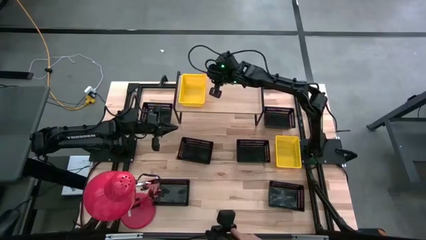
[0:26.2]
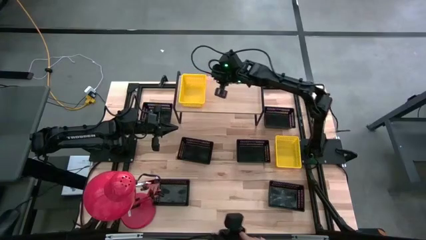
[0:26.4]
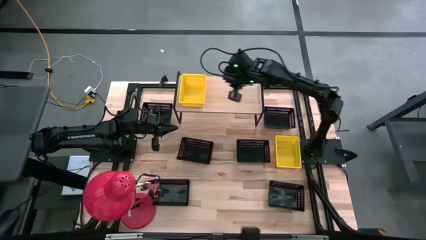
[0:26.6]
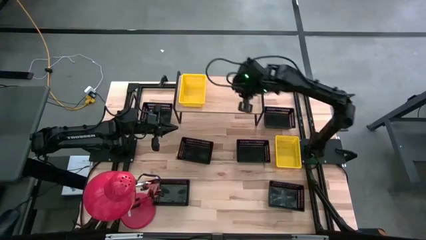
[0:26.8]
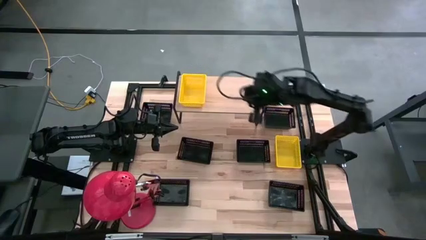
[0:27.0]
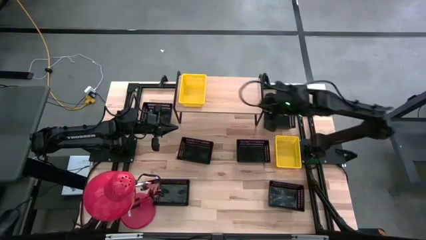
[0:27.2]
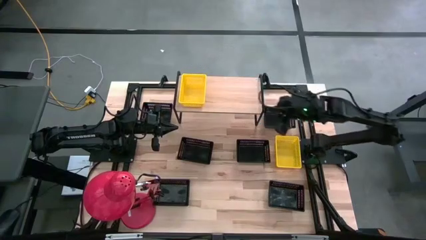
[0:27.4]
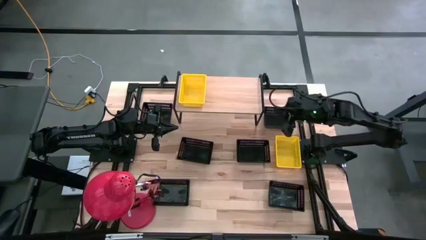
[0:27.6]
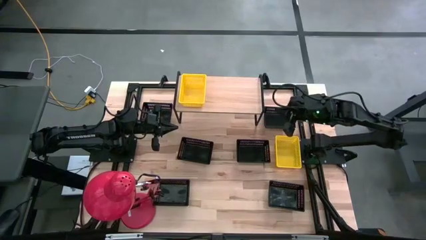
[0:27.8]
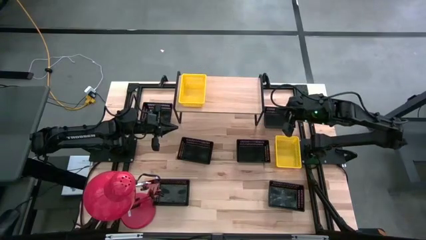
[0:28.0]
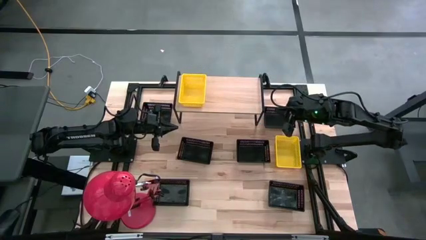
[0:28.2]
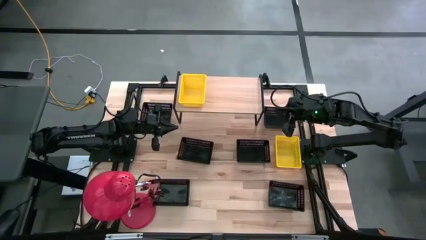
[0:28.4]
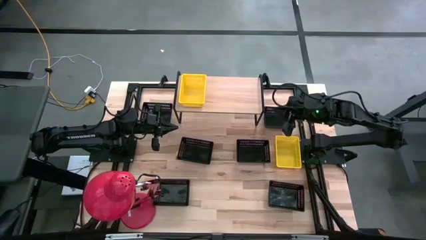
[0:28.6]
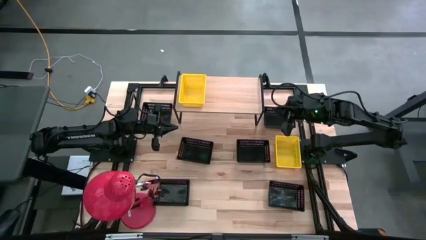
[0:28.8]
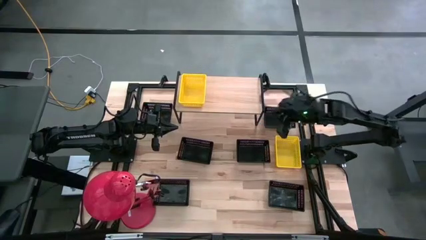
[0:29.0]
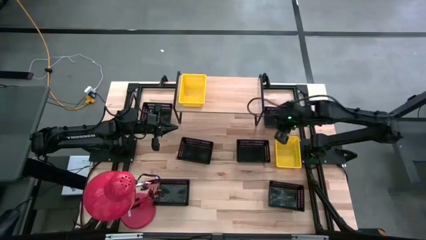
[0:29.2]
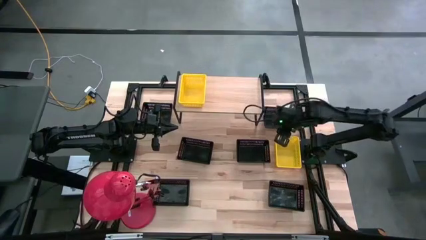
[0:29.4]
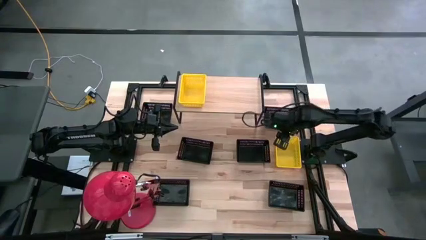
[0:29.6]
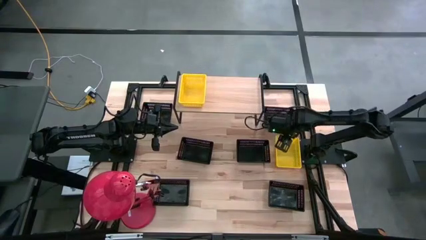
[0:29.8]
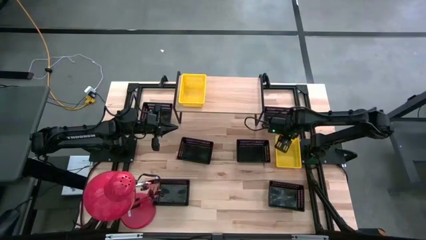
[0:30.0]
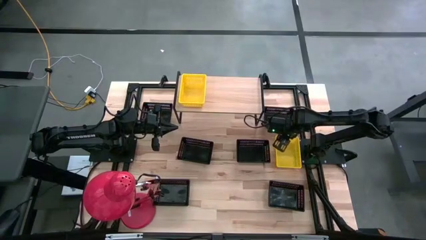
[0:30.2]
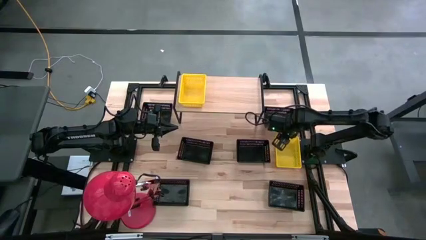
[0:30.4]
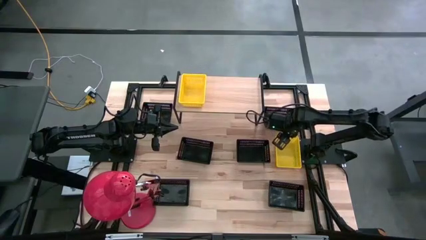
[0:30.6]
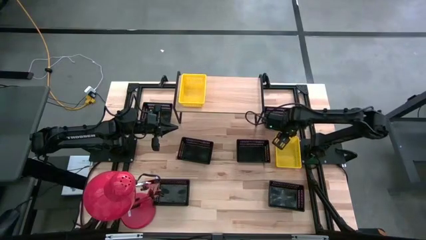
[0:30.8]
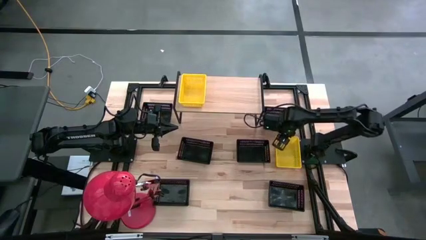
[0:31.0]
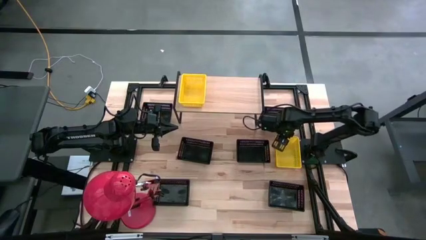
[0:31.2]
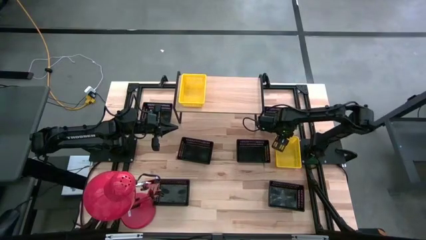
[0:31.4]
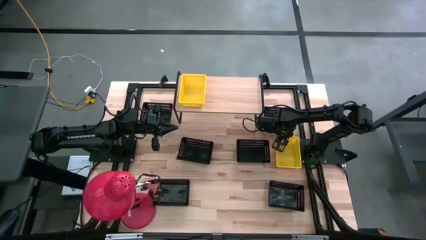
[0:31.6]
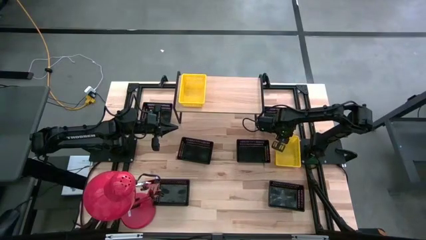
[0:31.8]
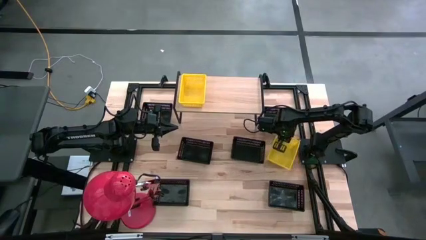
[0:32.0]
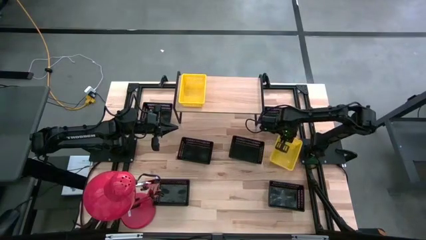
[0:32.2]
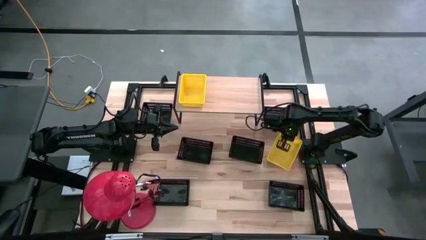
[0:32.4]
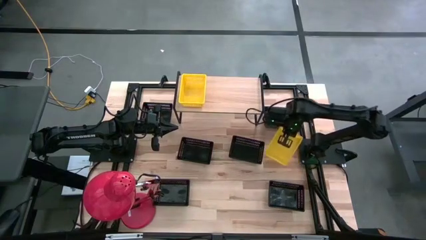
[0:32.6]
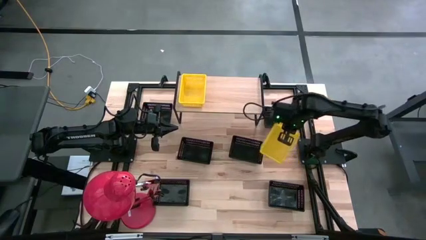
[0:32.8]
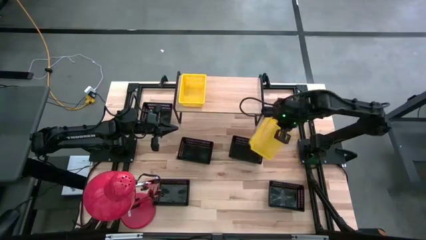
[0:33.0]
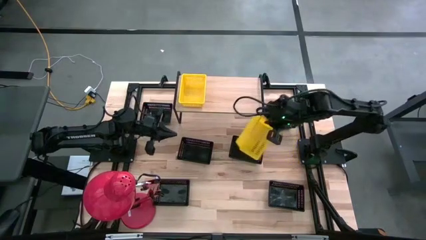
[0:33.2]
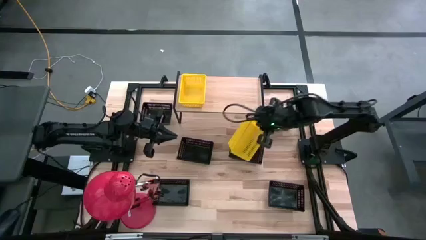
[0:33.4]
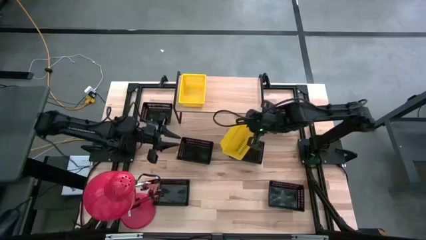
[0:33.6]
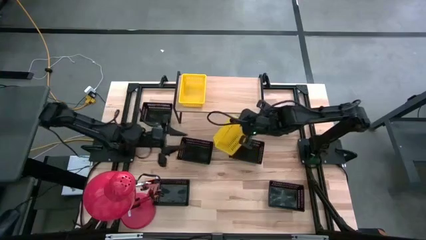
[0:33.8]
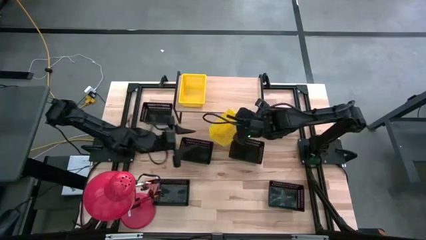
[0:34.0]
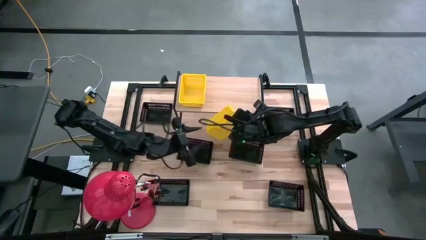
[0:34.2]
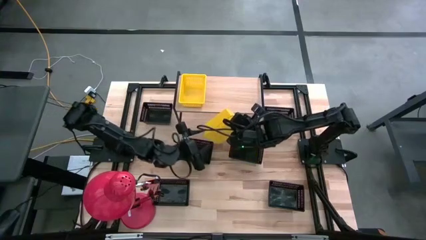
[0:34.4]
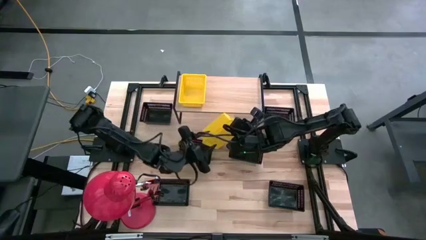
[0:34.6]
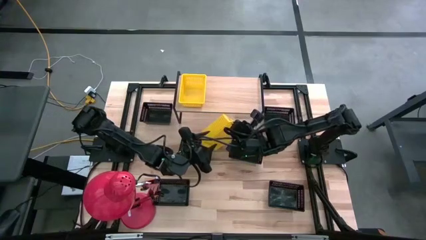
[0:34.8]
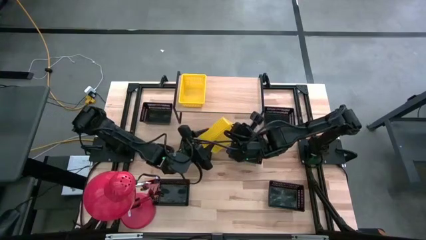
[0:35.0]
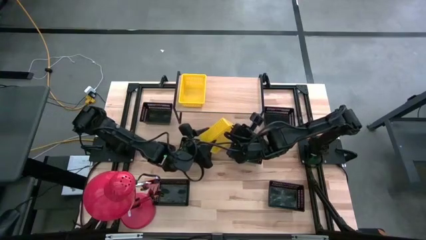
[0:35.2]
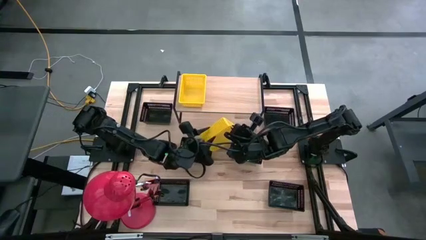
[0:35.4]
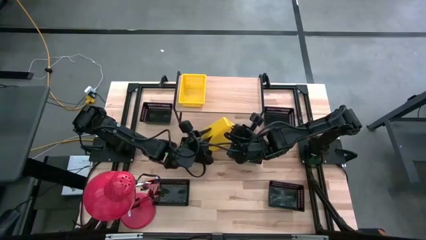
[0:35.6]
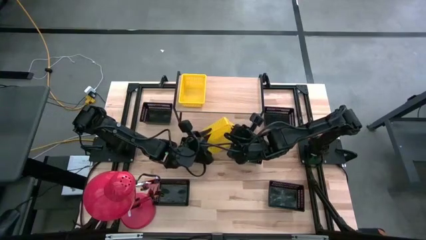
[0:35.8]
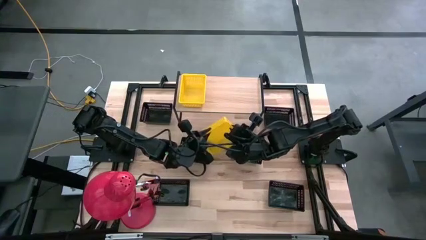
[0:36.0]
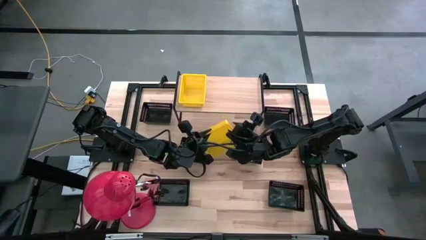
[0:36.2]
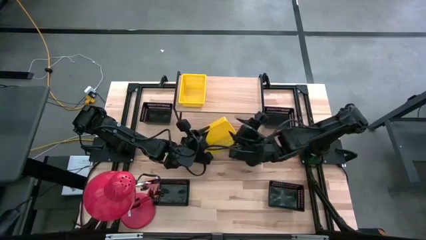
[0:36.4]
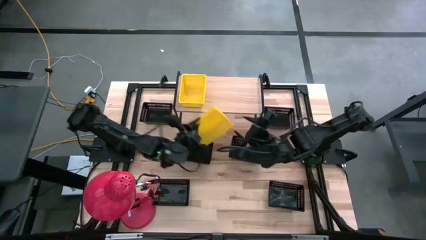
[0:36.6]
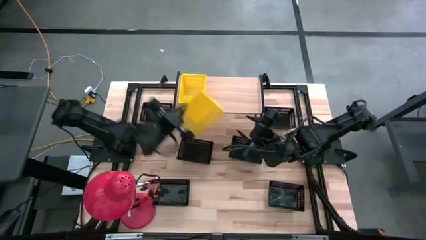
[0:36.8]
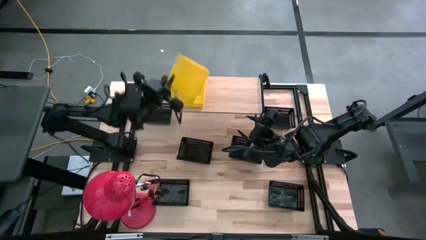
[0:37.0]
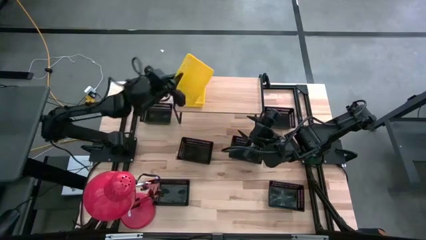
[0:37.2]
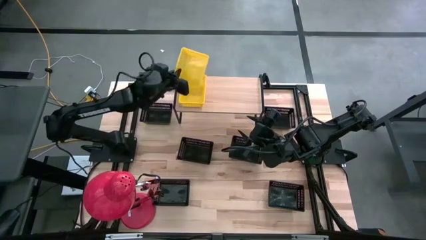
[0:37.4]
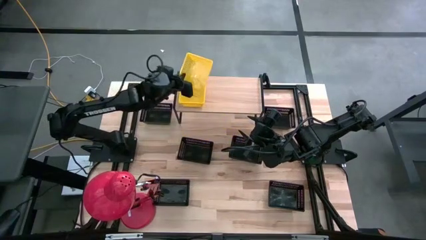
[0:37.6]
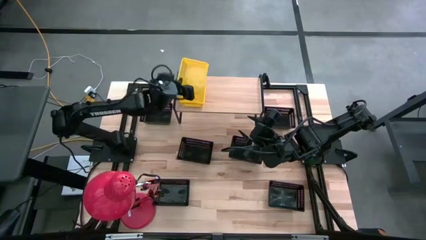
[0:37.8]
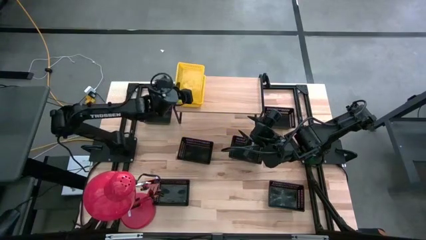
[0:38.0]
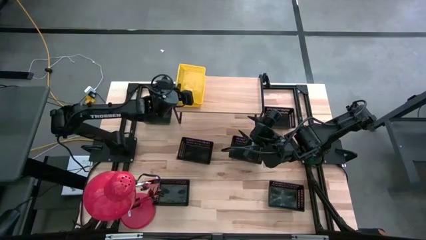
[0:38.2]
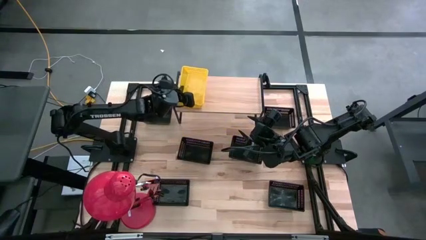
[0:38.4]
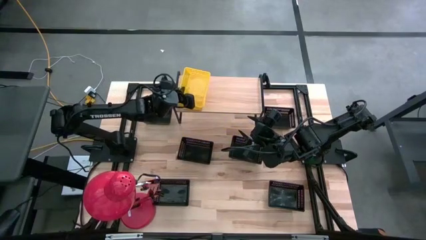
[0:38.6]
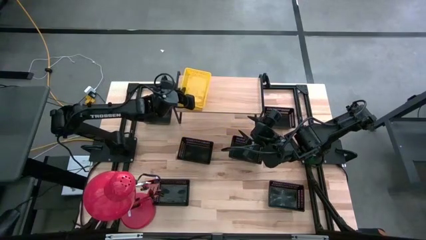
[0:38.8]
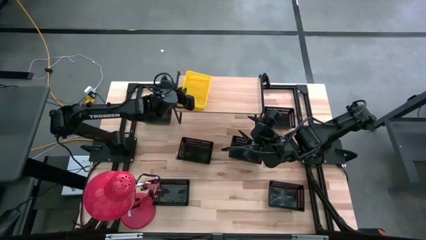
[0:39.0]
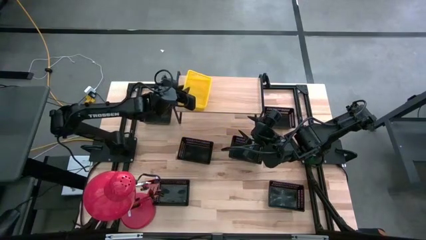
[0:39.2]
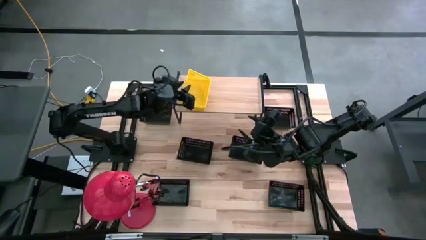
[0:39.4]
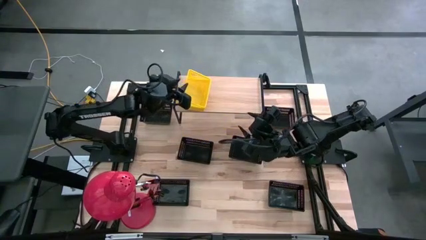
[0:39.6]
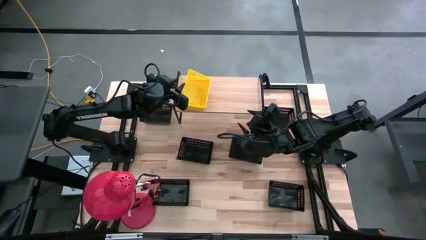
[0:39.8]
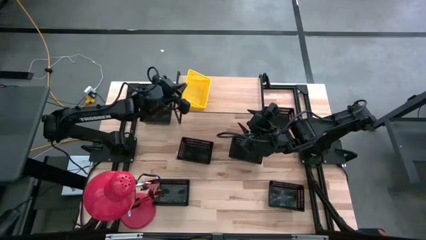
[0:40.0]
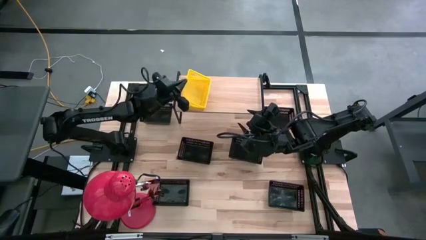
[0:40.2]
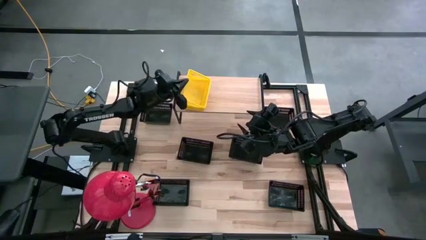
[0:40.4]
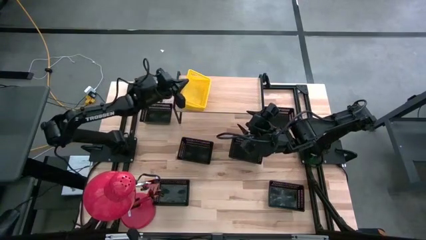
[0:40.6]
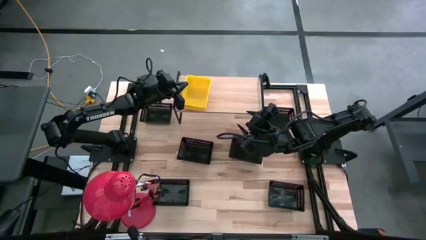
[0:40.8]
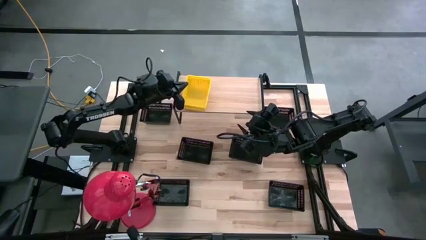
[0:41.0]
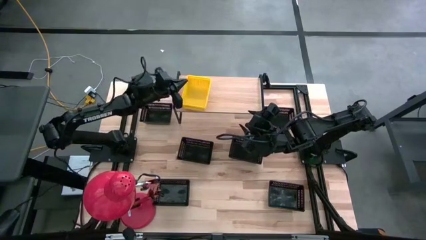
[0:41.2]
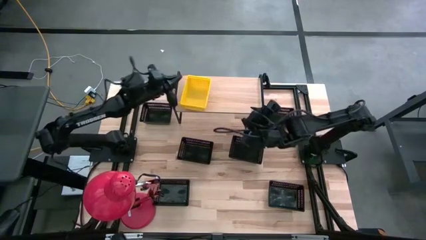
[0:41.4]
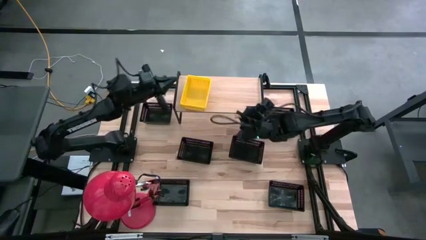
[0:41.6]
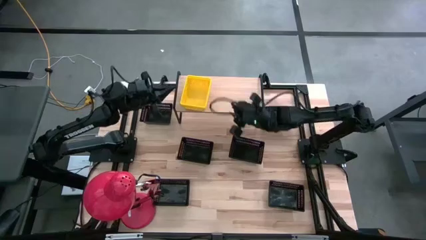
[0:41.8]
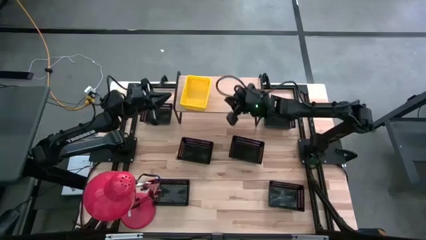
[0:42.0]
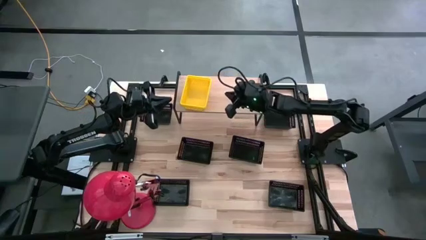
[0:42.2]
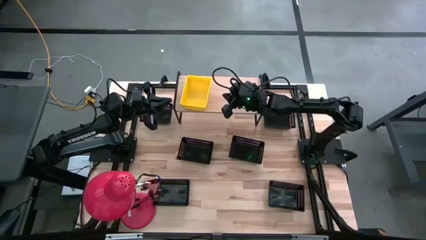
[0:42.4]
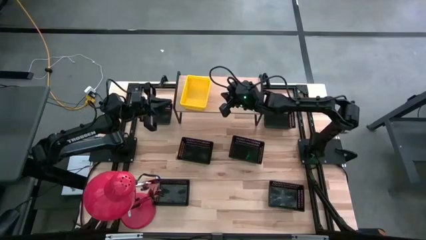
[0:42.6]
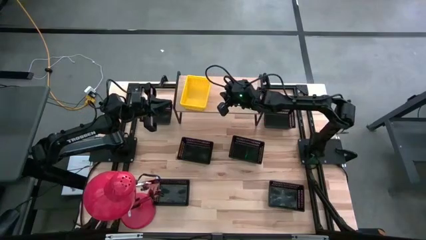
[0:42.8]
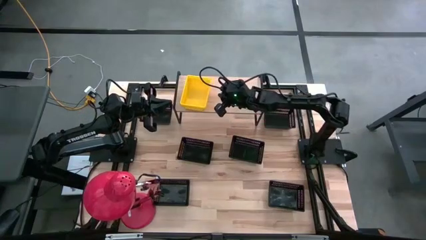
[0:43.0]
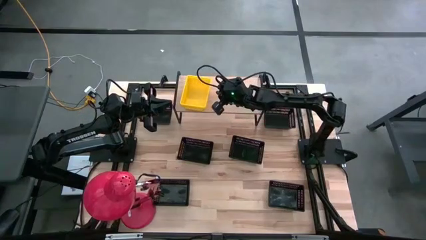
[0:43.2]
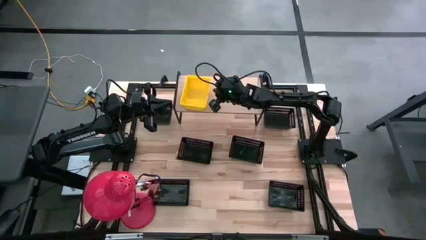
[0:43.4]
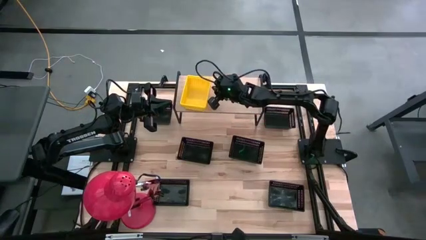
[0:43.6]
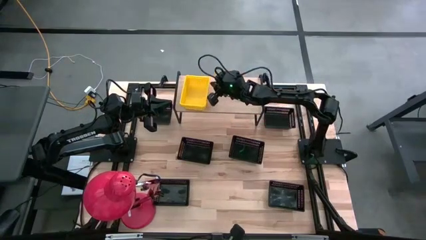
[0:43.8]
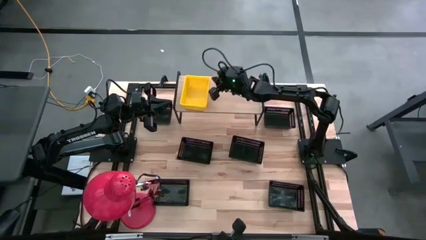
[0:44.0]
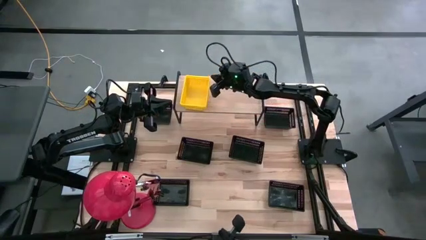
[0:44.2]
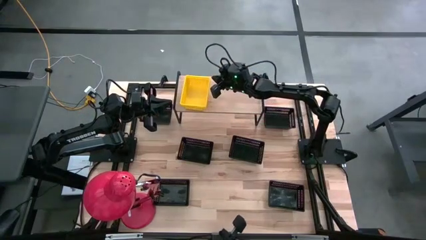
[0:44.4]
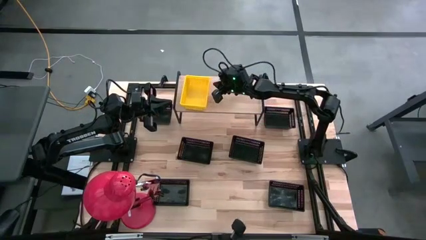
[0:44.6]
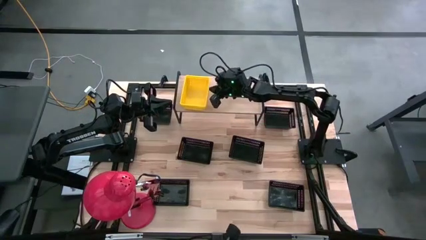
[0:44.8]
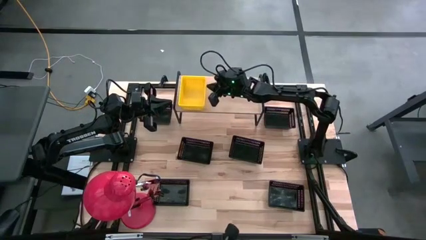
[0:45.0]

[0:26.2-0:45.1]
Task: Stack baskets on shelf by color
Stack the yellow bin on the yellow bin on the shelf
